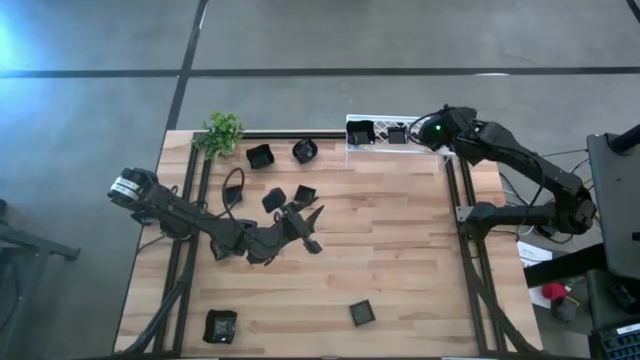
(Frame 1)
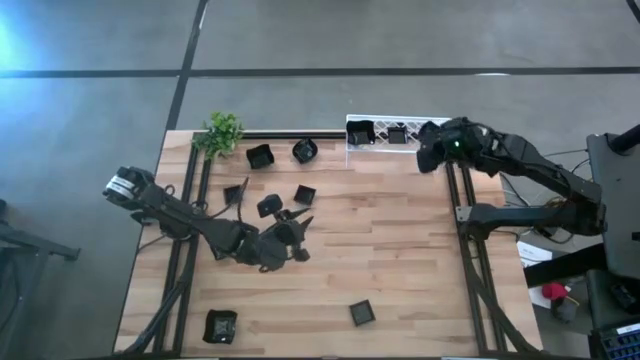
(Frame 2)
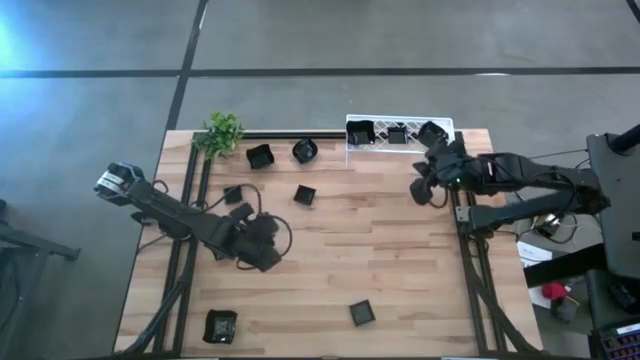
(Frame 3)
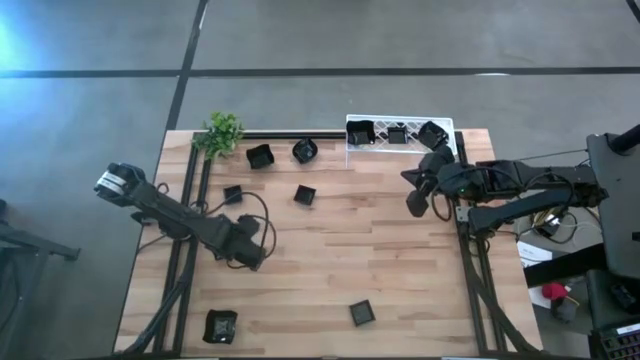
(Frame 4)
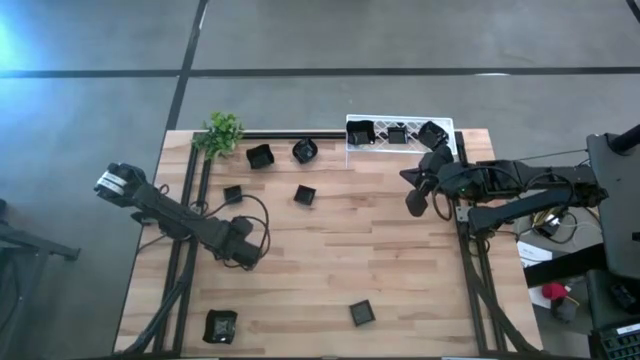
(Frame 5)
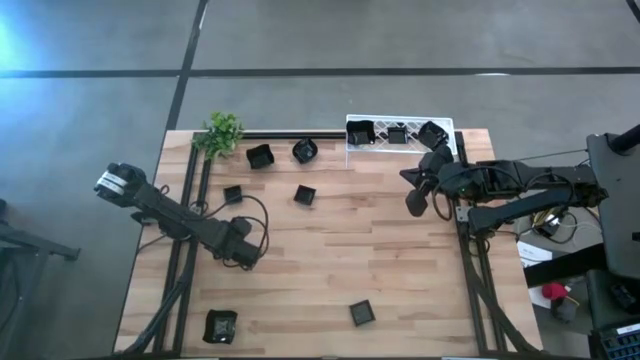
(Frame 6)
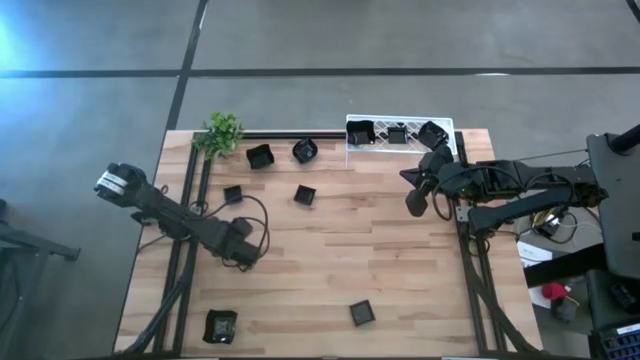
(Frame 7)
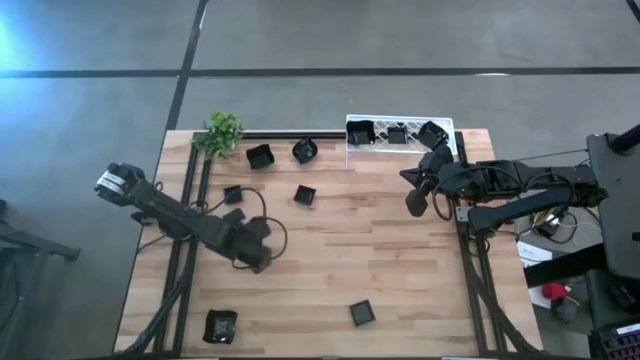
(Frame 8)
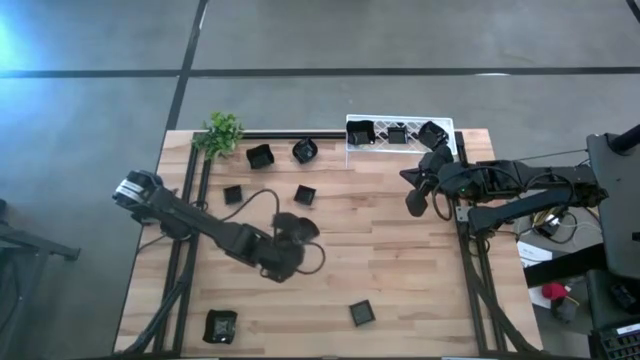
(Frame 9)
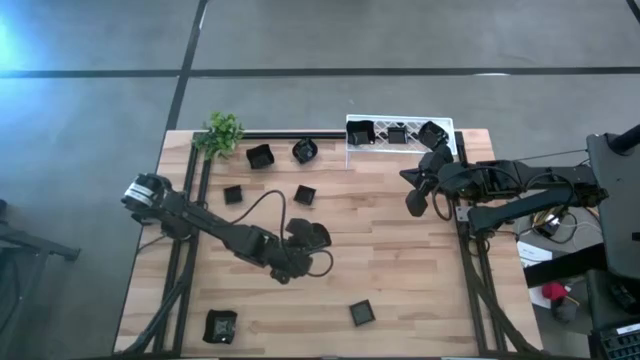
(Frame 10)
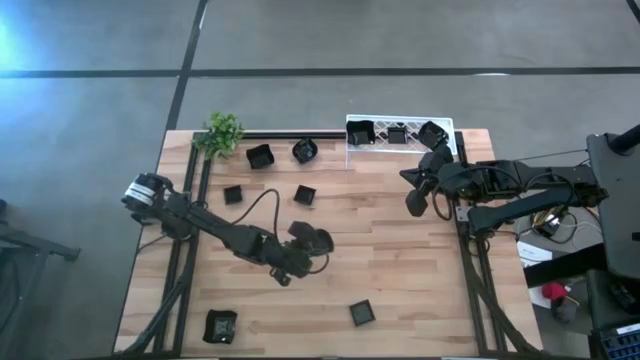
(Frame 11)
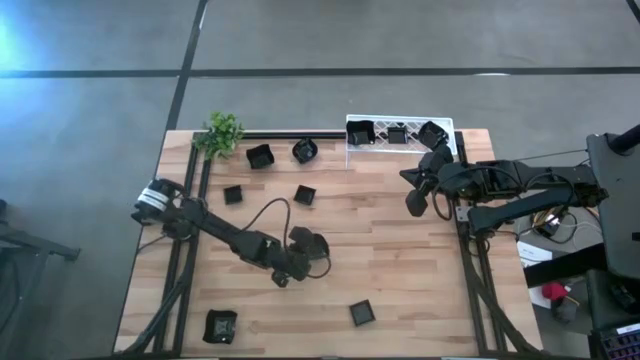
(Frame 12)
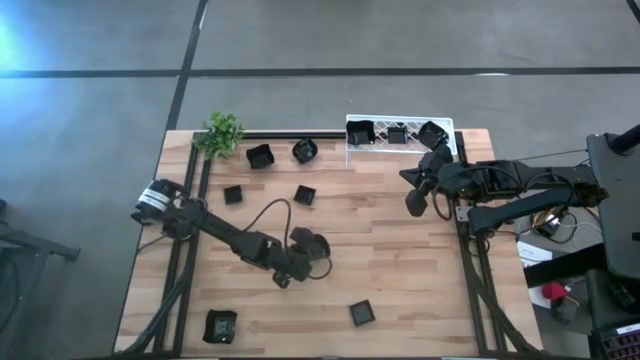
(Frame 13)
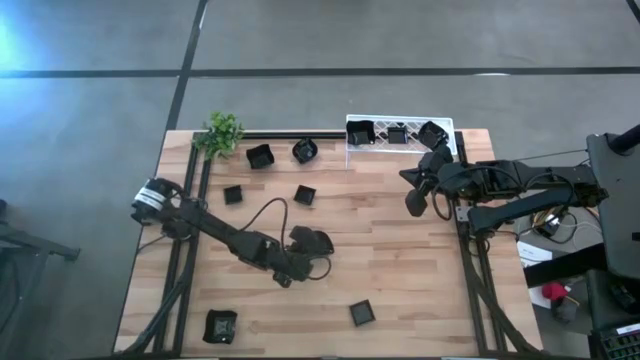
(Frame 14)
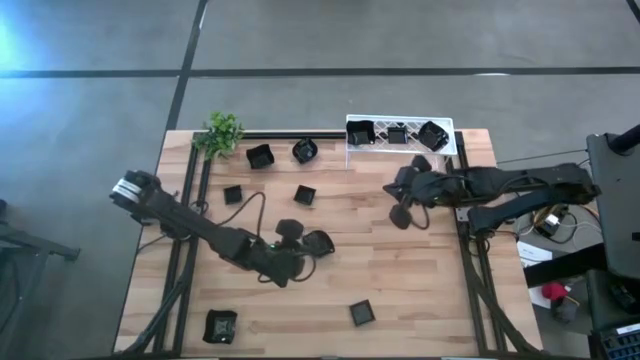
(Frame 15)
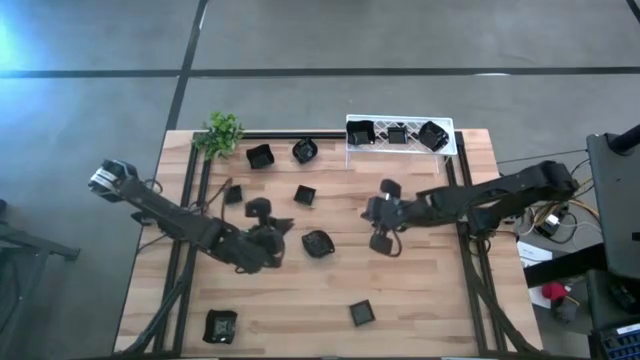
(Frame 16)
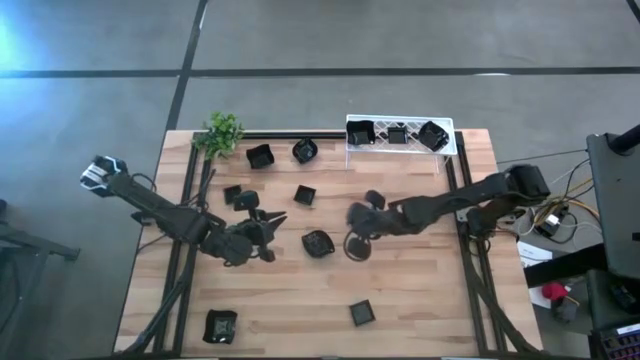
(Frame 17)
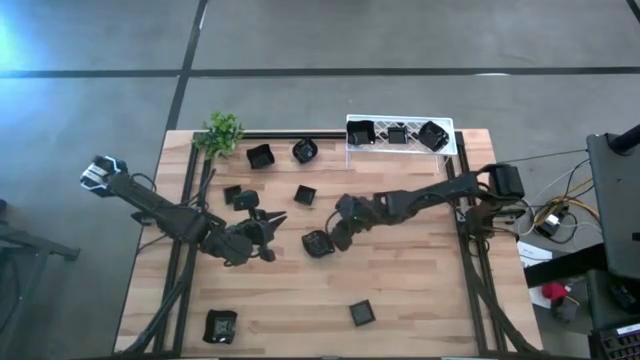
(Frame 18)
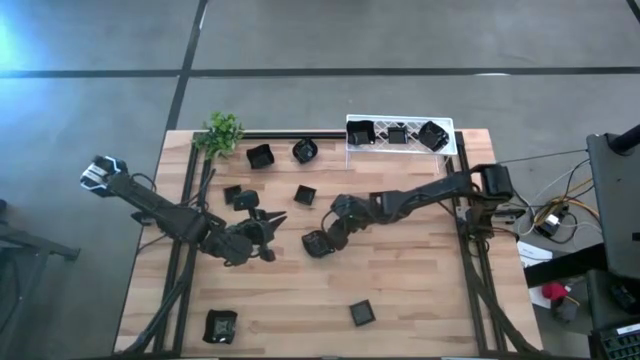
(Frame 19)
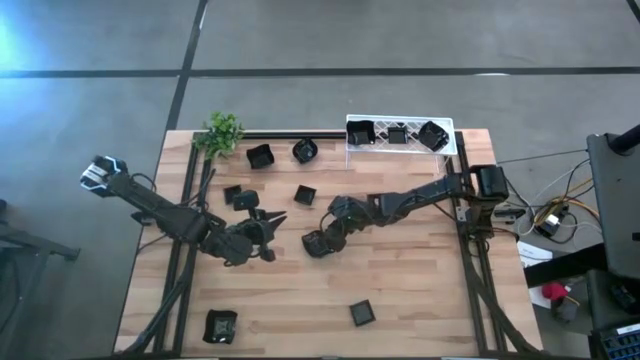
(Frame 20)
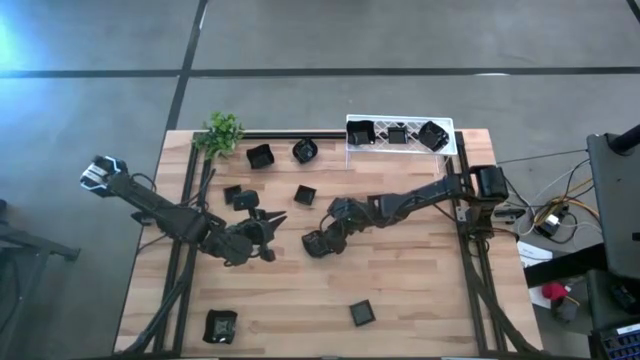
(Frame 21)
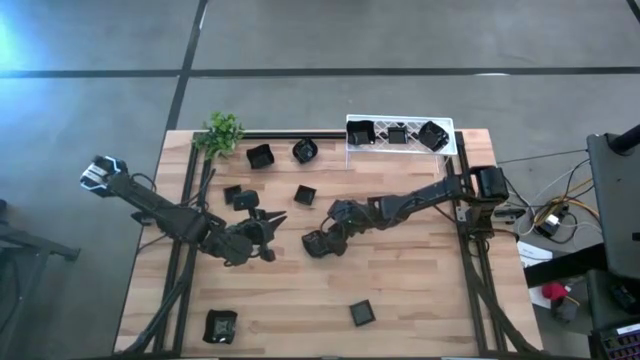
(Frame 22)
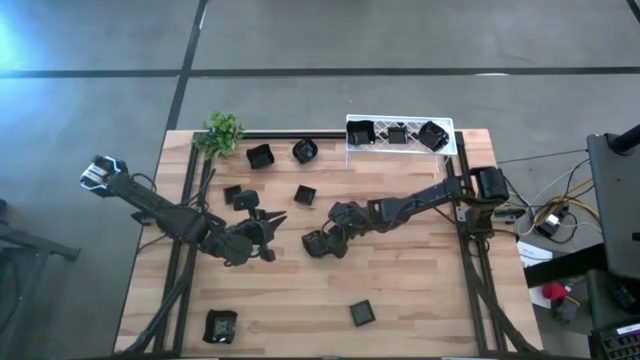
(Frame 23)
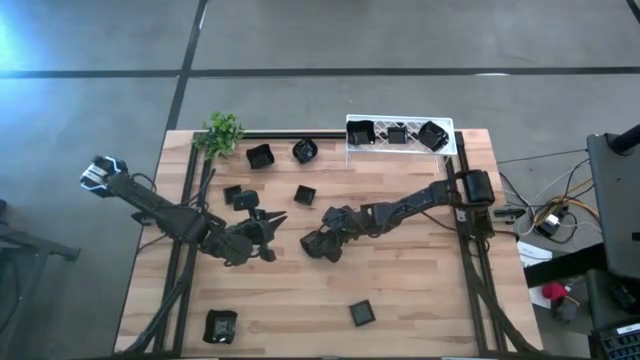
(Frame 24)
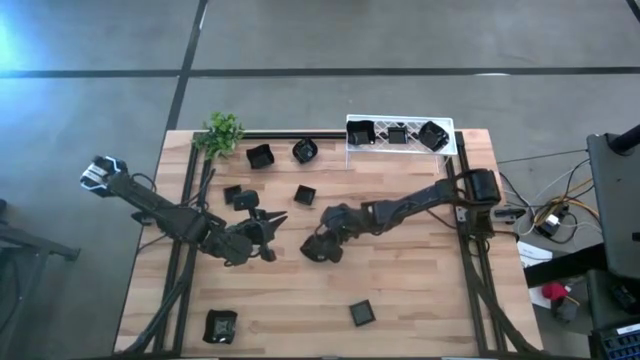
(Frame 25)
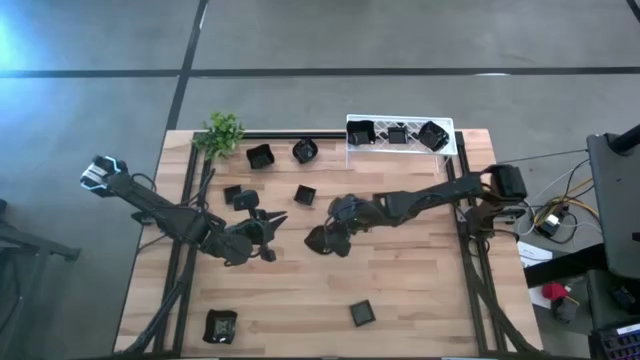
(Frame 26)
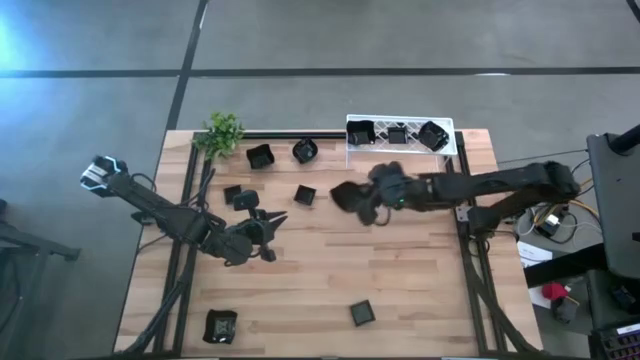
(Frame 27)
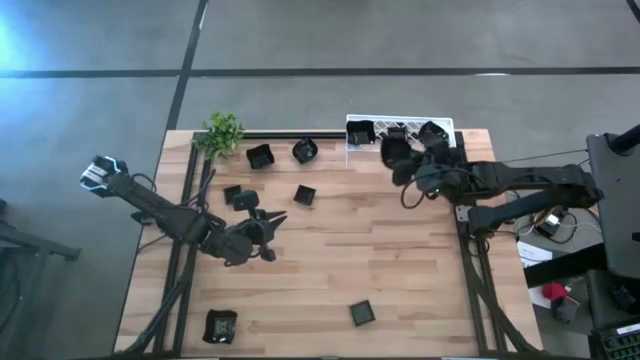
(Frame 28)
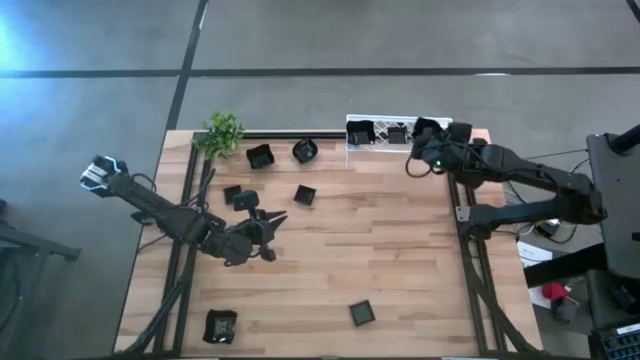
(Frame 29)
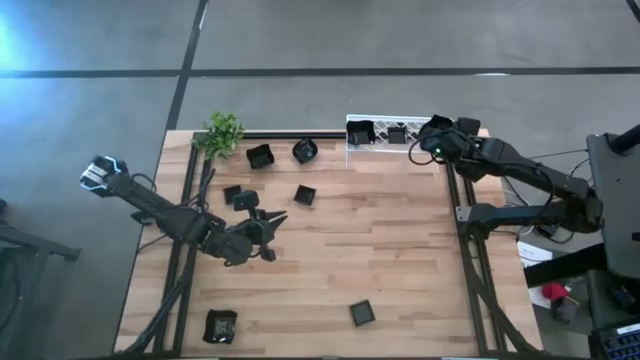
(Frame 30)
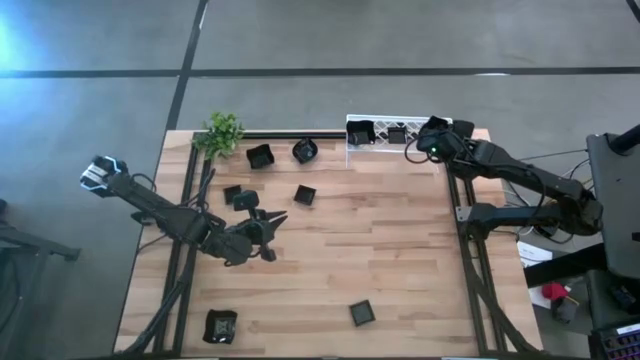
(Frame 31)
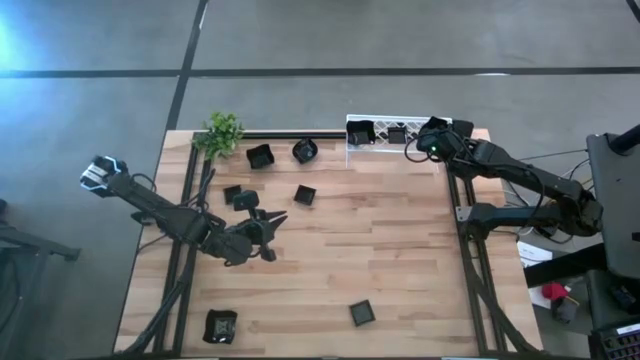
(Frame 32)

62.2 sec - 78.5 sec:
Task: Pick & Place Mini shaped plates
Stack the black leaf-shaped plate on top of the black leaf-shaped plate on the shelf

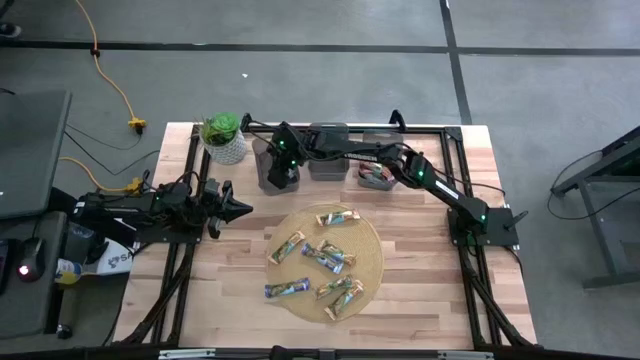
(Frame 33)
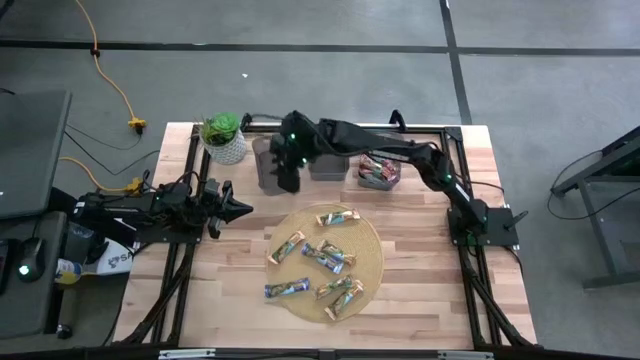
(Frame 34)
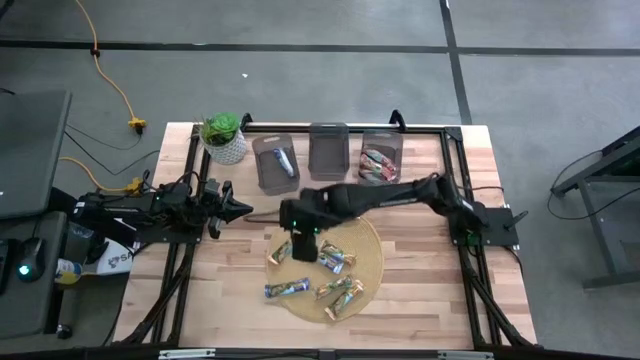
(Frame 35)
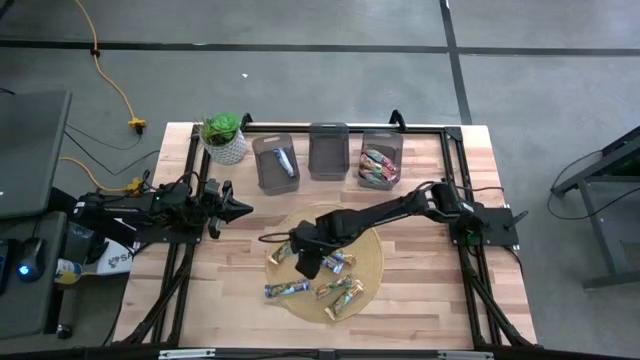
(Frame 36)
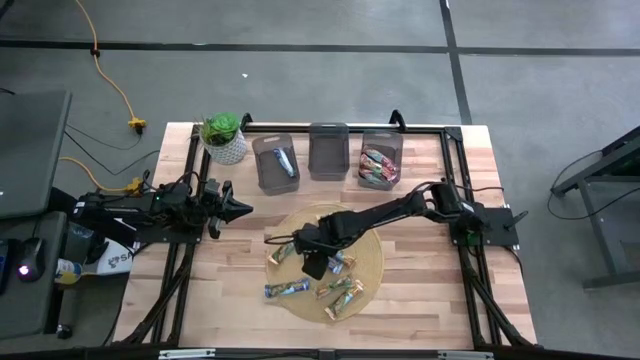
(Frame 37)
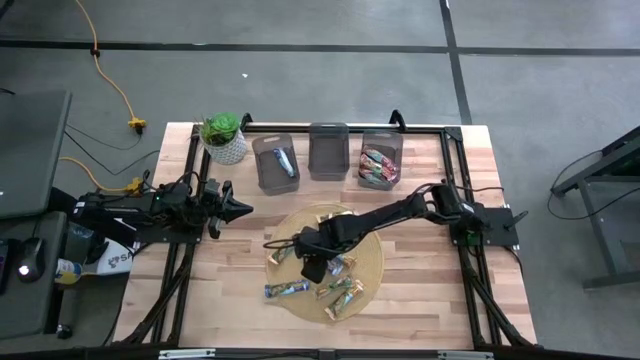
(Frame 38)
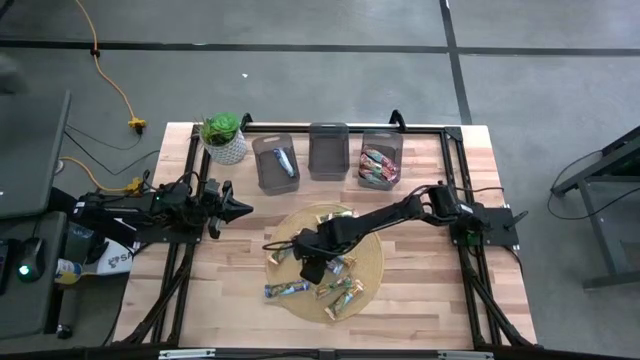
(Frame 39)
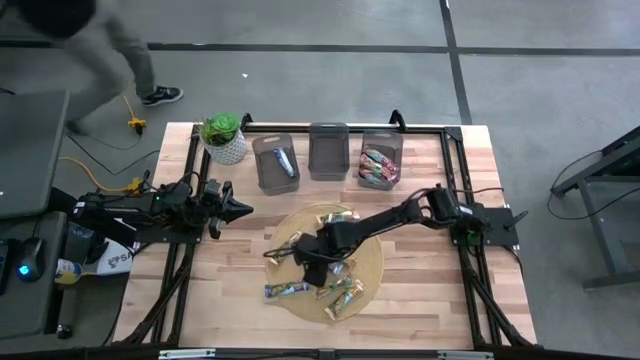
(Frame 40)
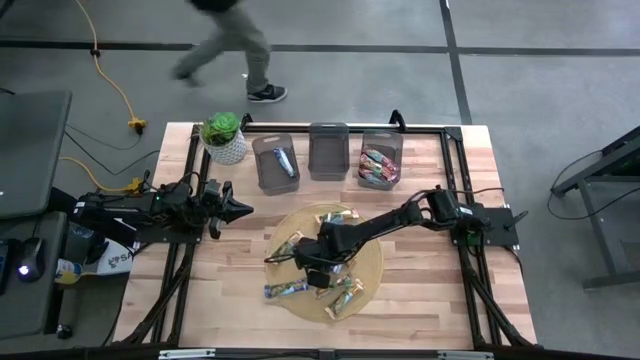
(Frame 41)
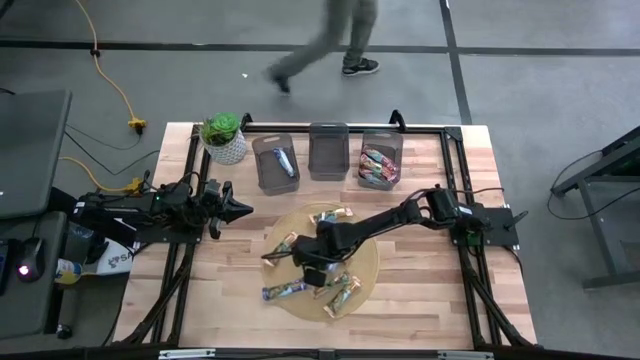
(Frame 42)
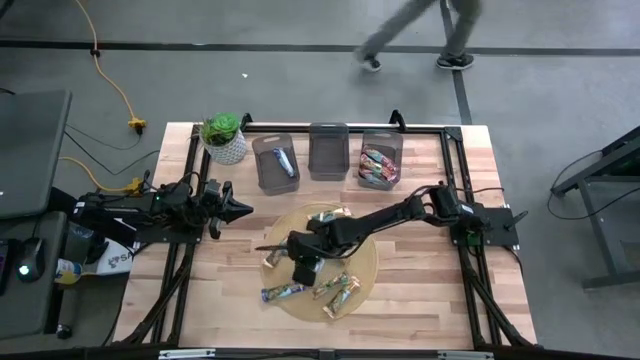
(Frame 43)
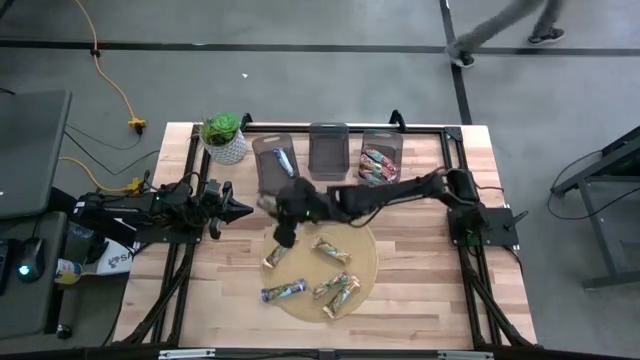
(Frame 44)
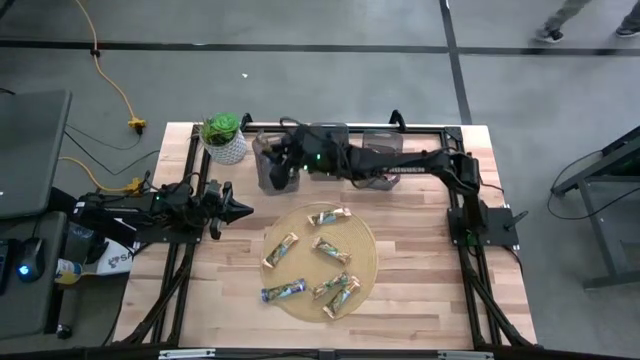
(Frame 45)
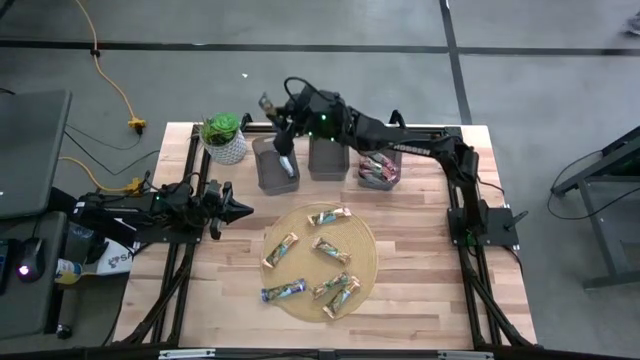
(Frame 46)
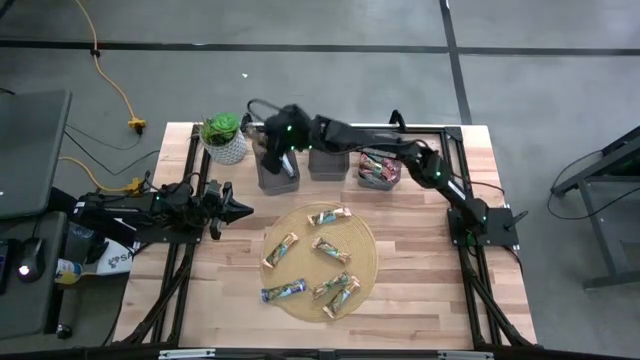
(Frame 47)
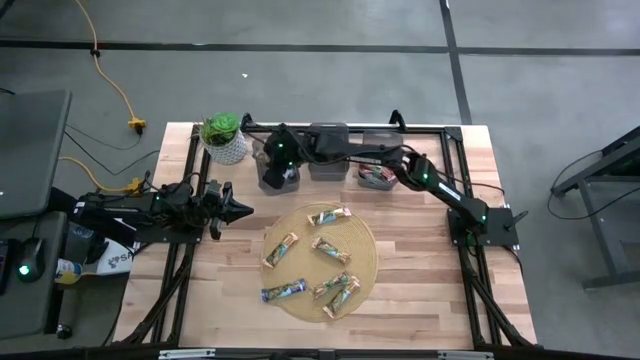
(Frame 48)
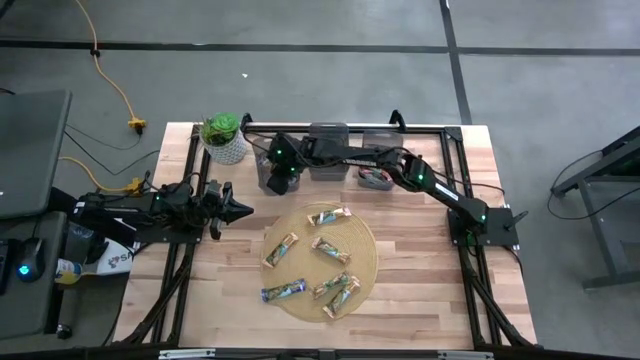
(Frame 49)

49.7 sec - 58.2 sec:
Task: Pick and place Granola Bars by type
Put the blue granola bar into the left black bin
